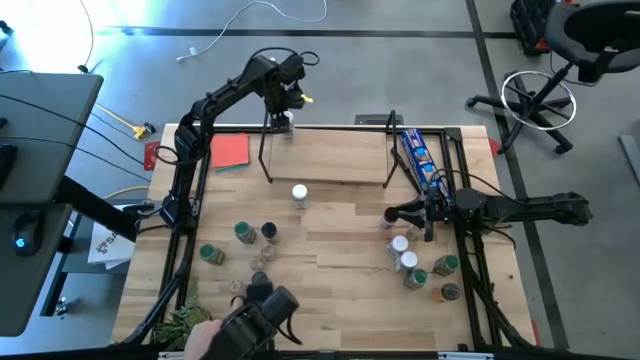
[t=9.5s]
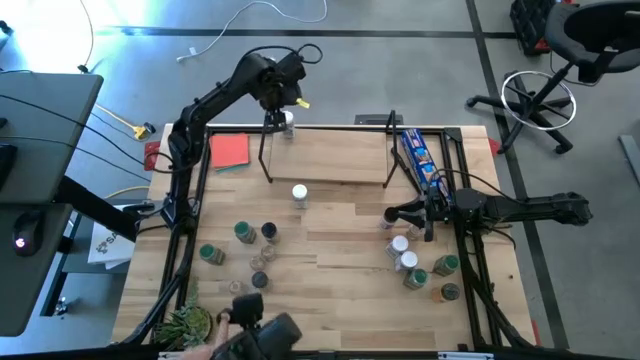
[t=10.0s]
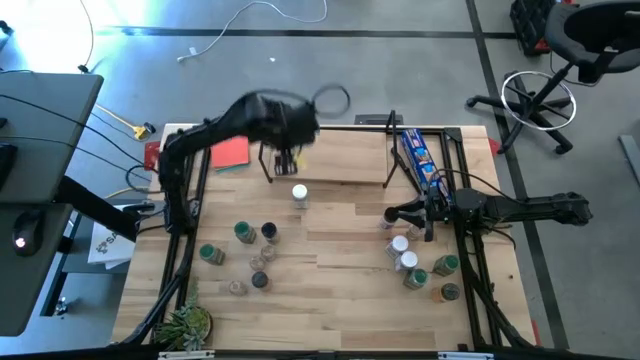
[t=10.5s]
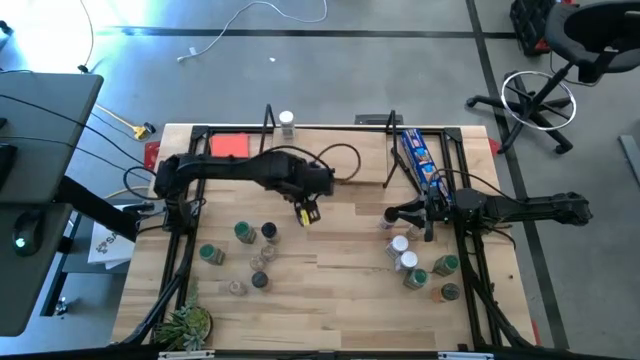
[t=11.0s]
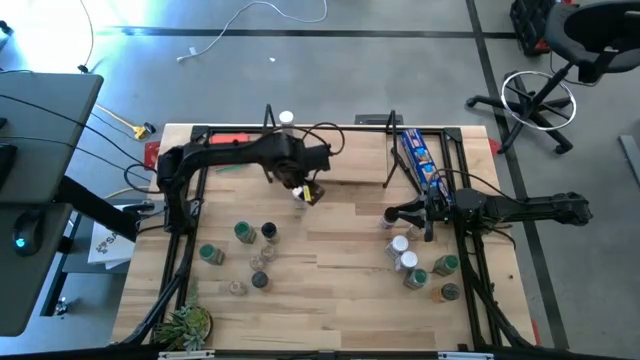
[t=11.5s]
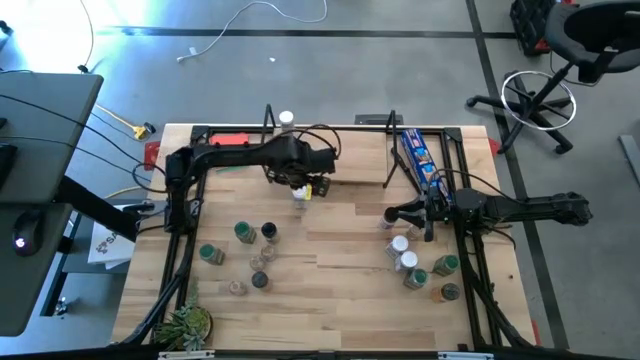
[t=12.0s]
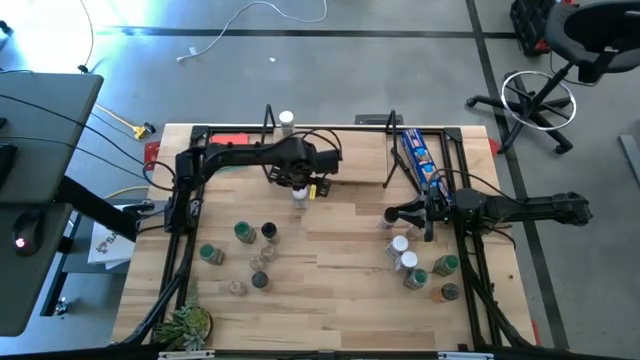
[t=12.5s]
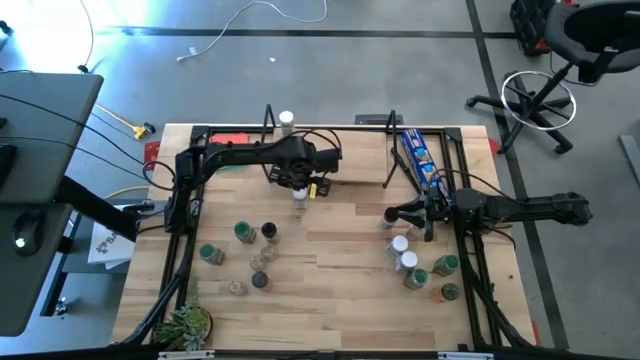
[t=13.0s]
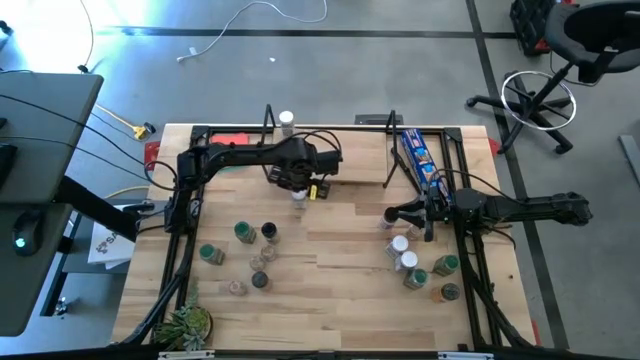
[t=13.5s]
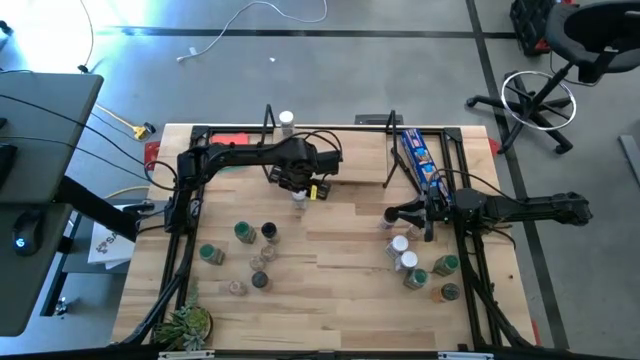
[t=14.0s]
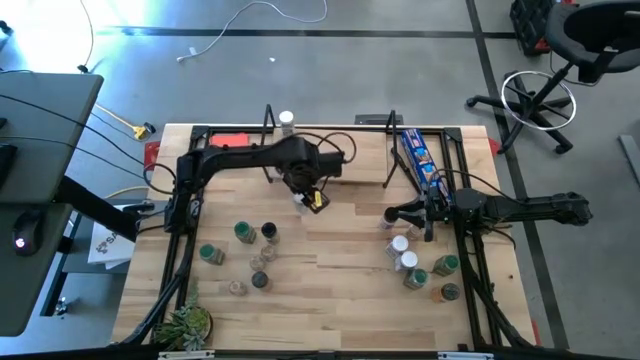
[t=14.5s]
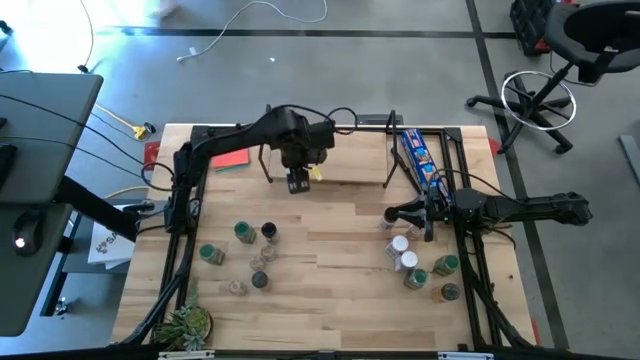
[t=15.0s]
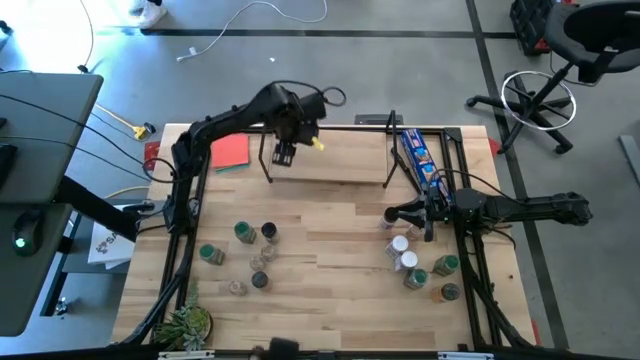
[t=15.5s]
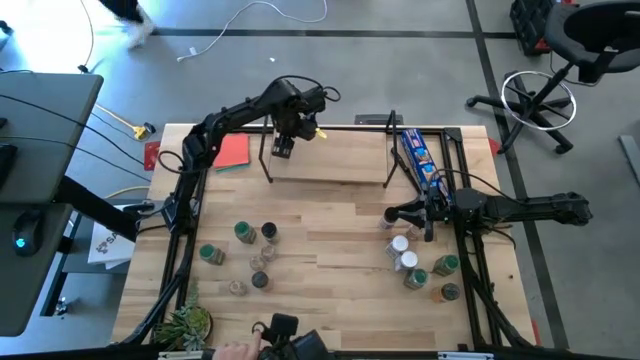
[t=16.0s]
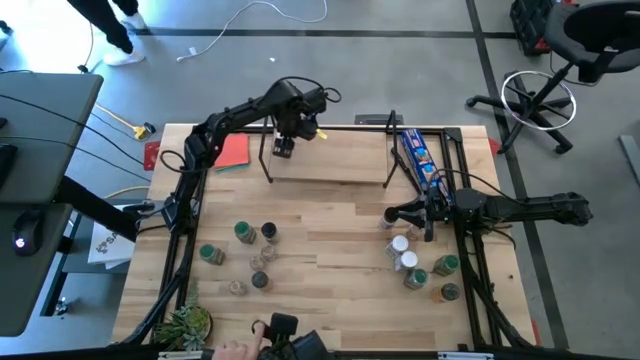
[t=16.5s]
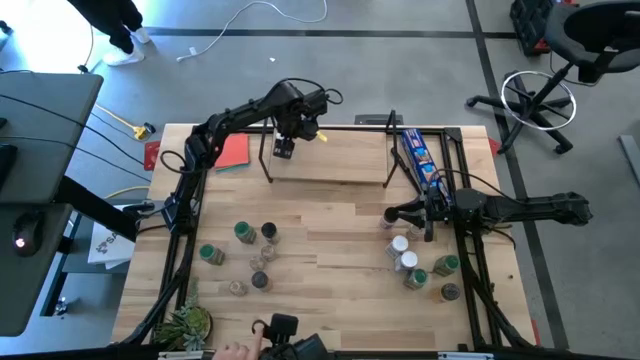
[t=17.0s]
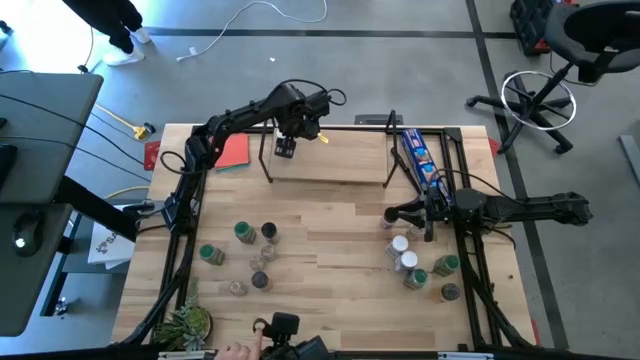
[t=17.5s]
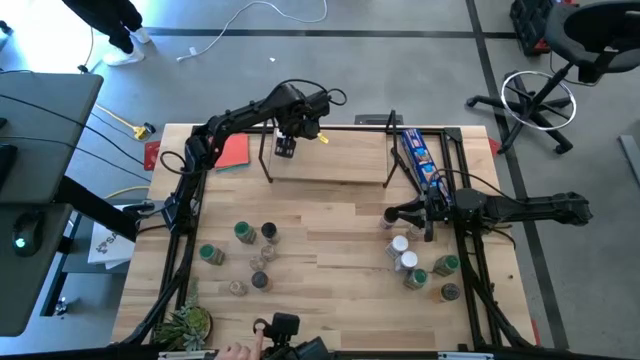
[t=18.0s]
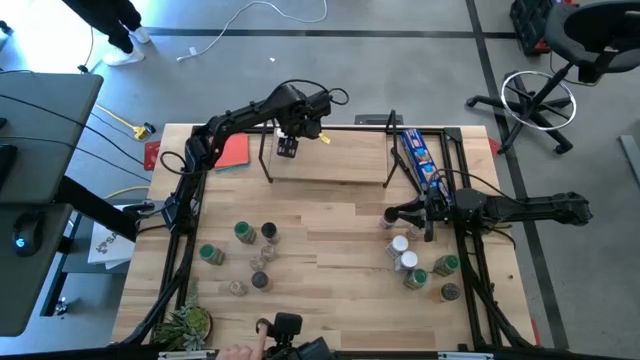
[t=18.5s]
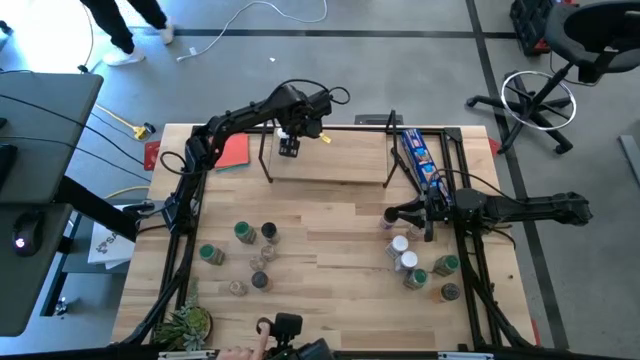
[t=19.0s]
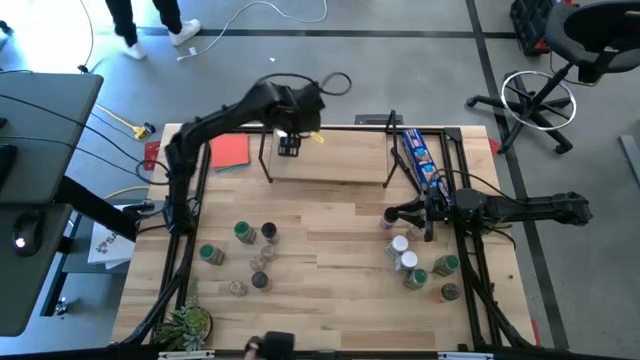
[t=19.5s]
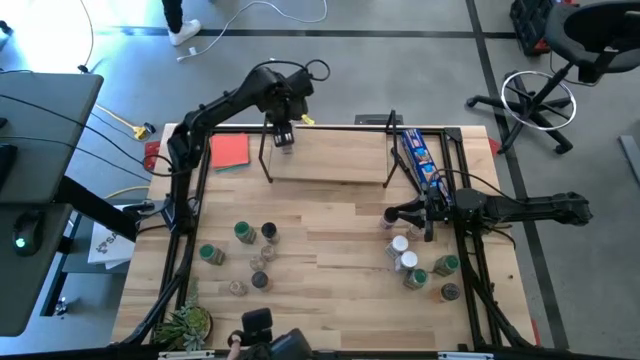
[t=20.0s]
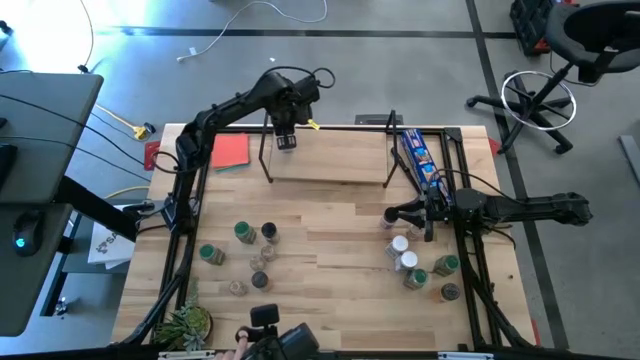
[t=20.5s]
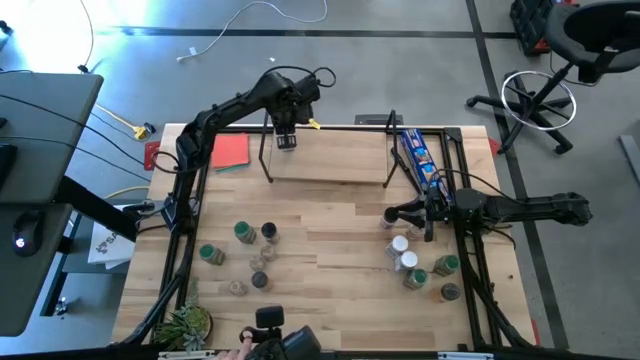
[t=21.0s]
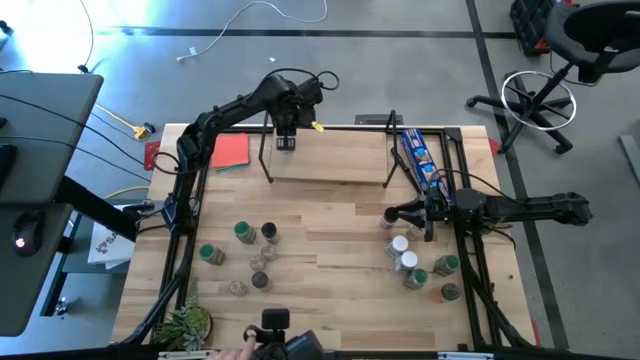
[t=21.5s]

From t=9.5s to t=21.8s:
Task: Shelf spices
Put the white seasoning bottle on the shelf aligned with the other white seasoning bottle

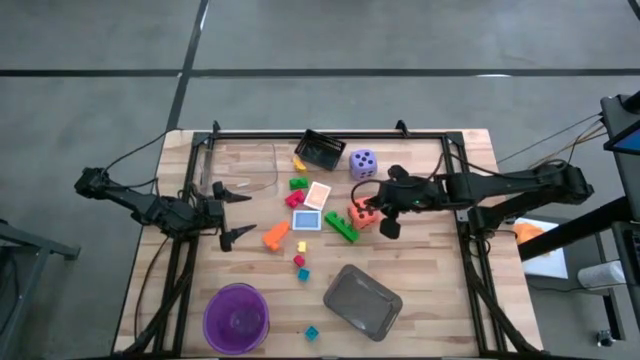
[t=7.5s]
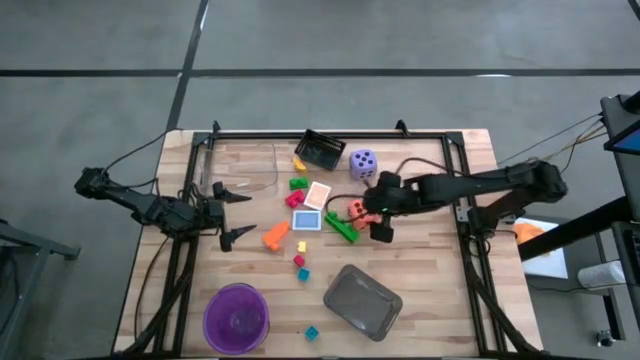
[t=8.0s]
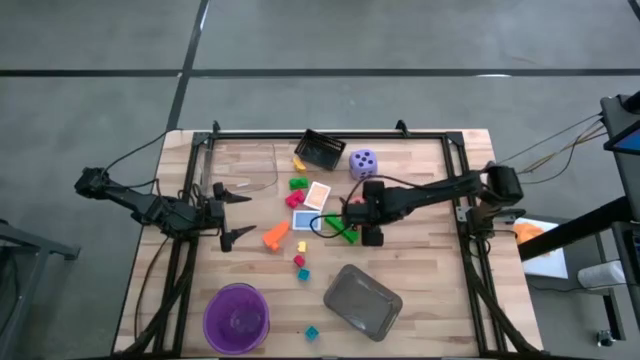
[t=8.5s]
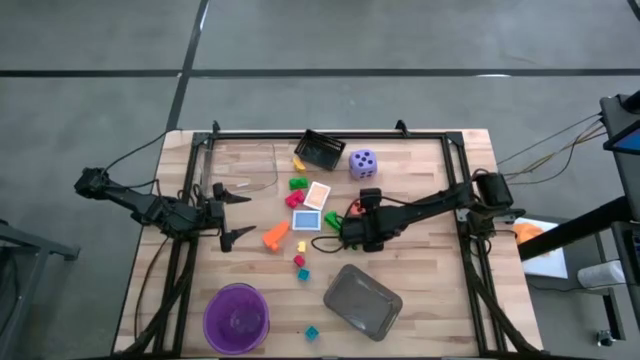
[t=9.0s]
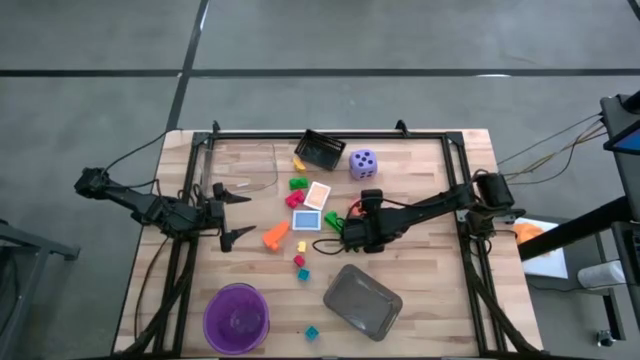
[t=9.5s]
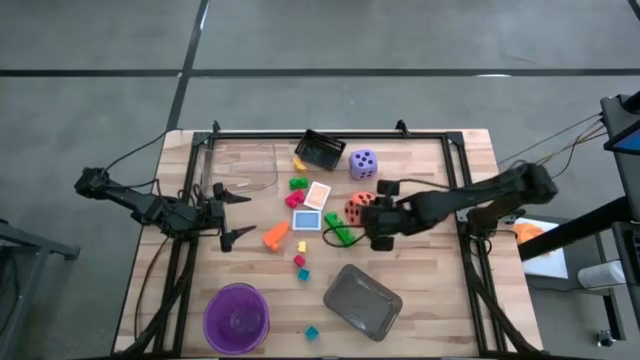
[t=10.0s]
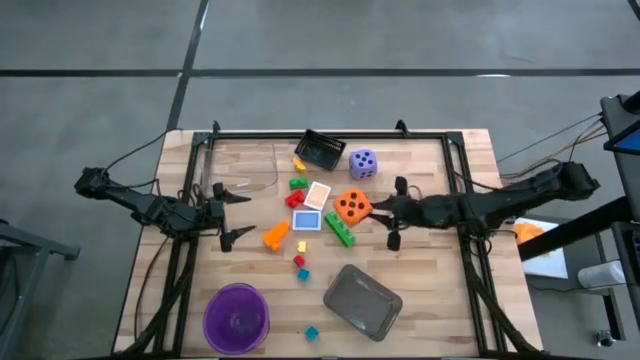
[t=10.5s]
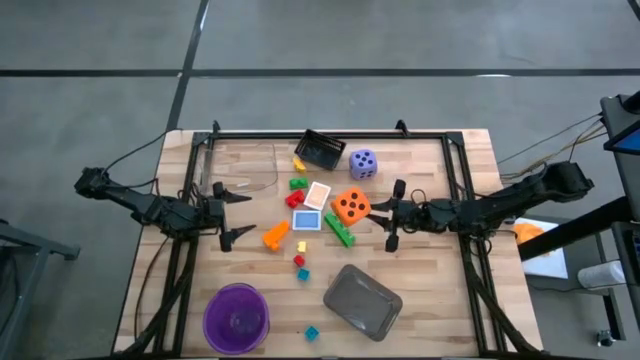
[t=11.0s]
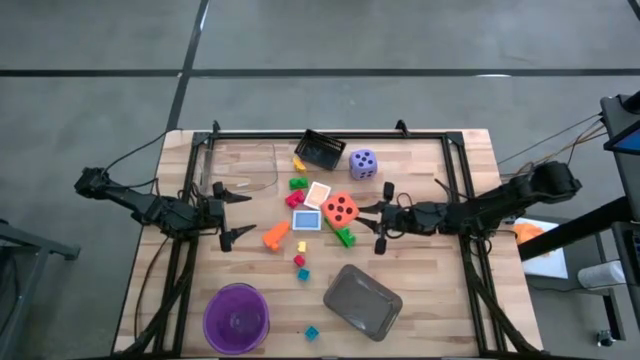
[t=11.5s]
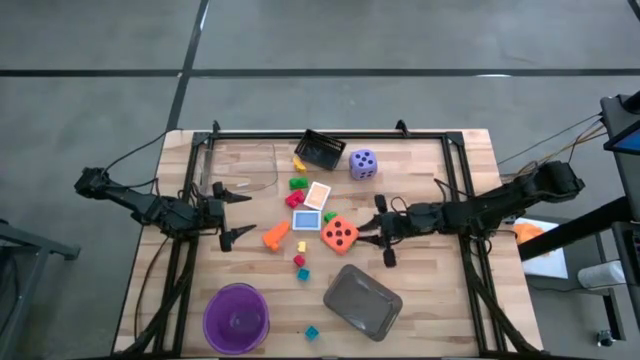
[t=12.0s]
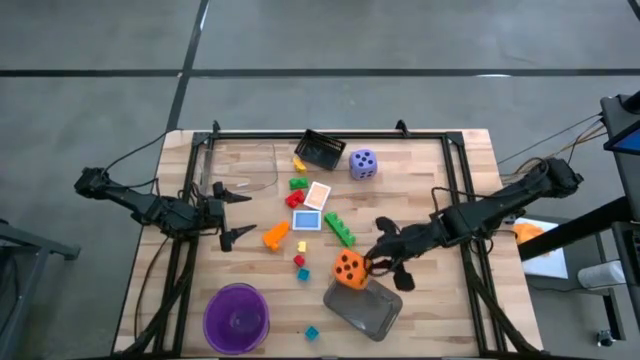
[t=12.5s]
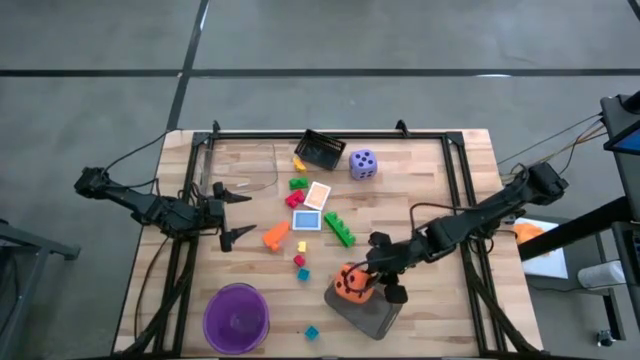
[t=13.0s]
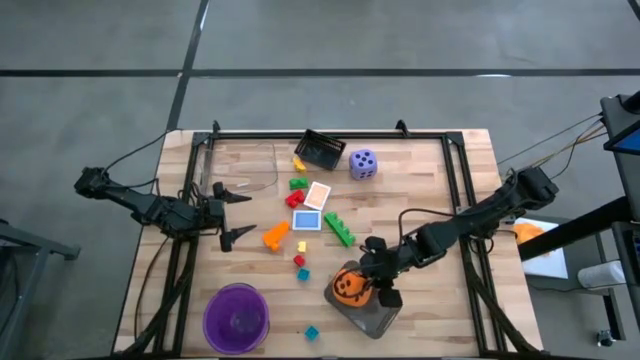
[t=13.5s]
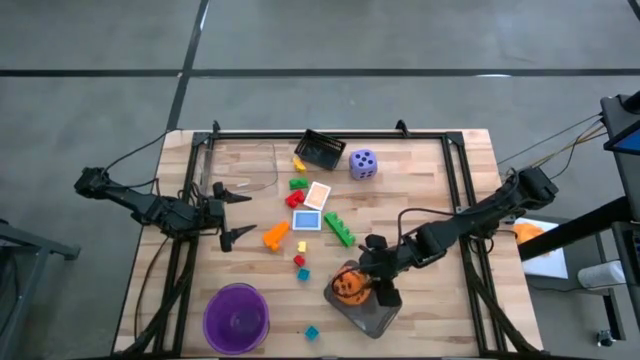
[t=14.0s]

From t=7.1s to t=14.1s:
Task: Pick & Place Toys
Put the orange die into the gray bin
